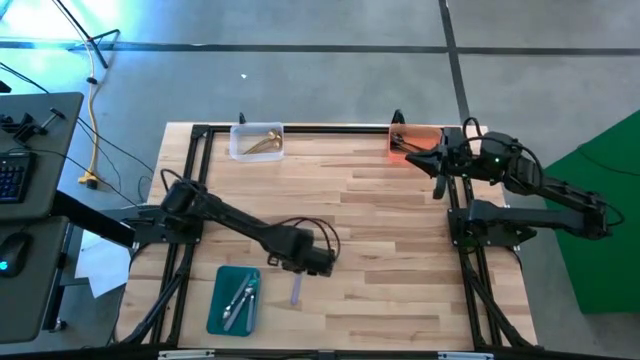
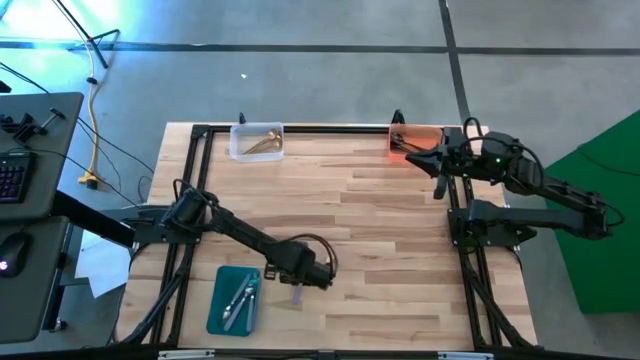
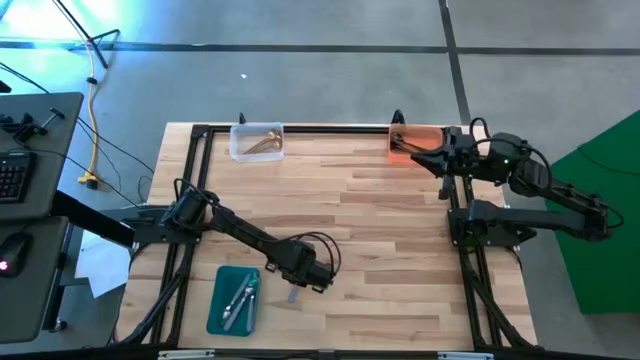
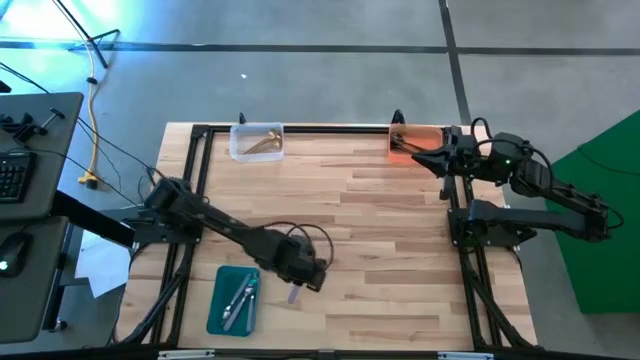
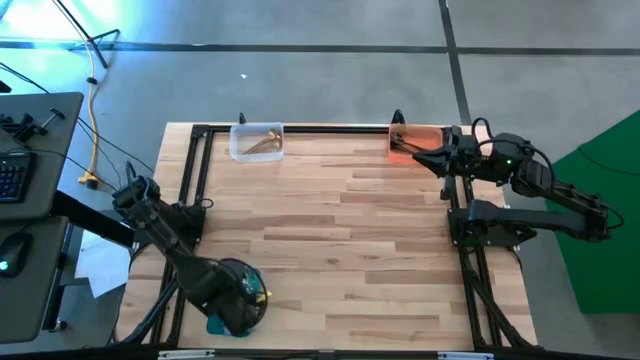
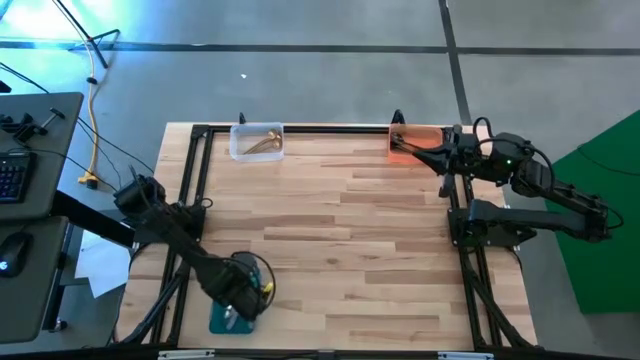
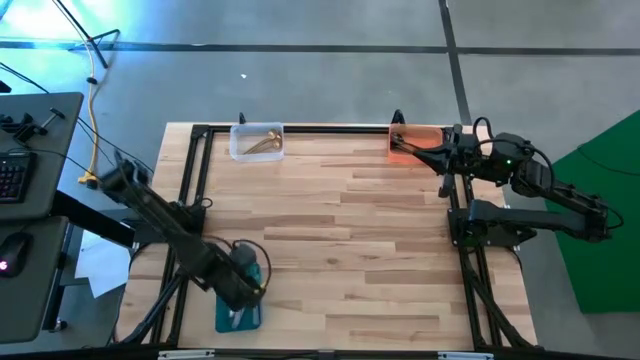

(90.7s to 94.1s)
Task: Sort silverware by color (type)
Put the purple spoon into the blue bin

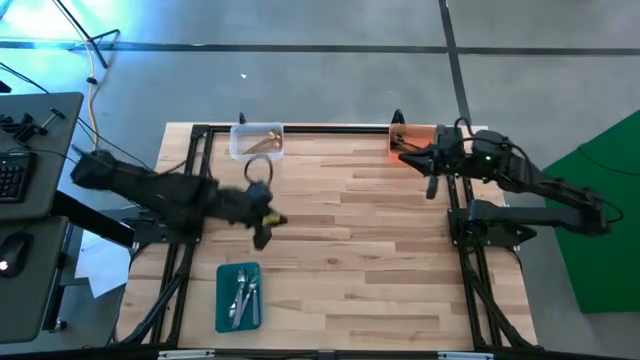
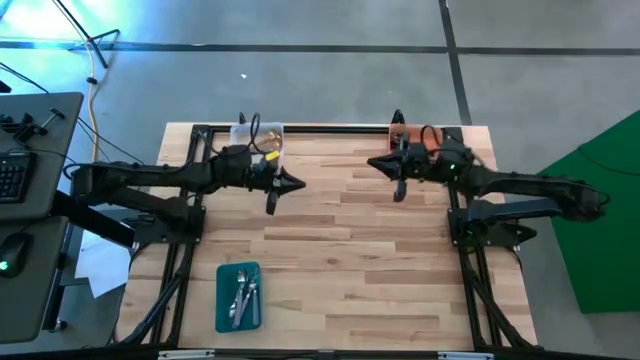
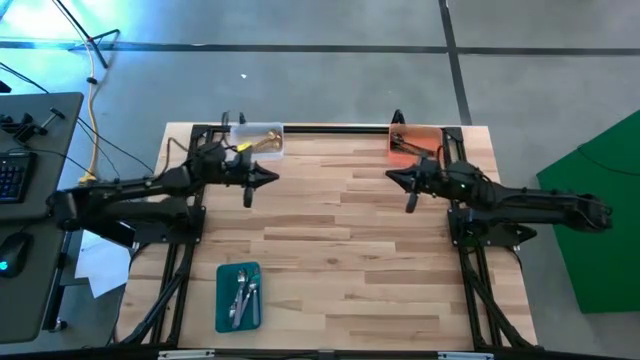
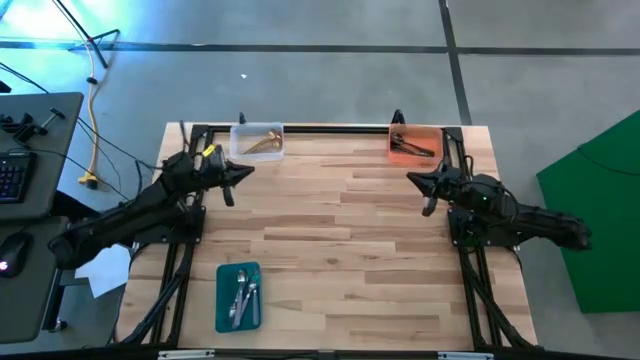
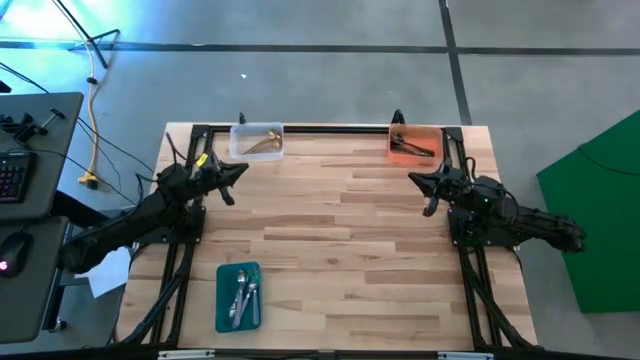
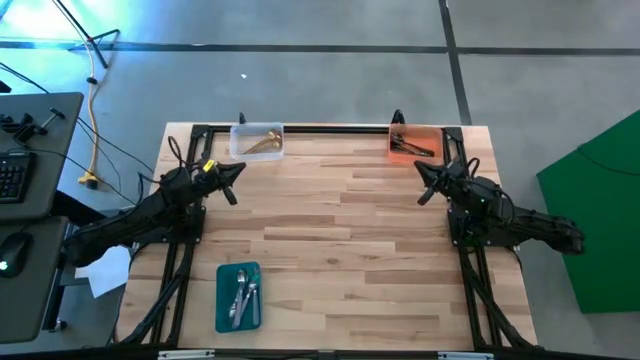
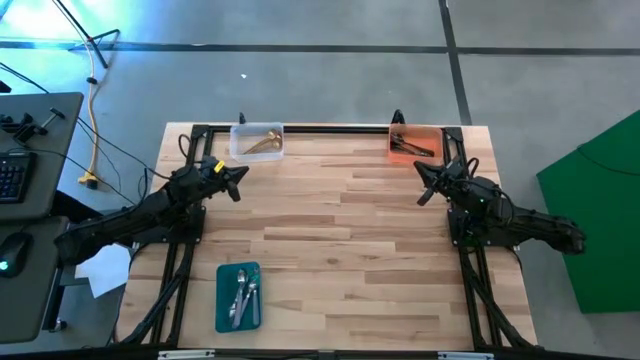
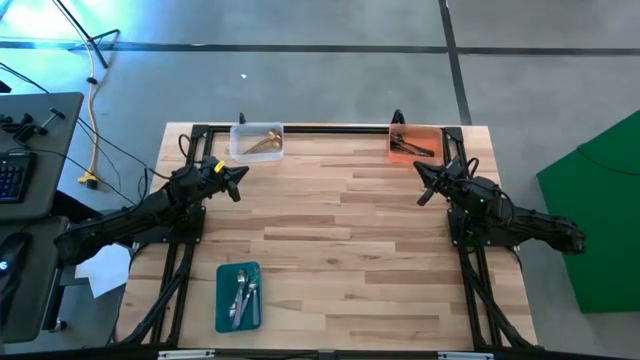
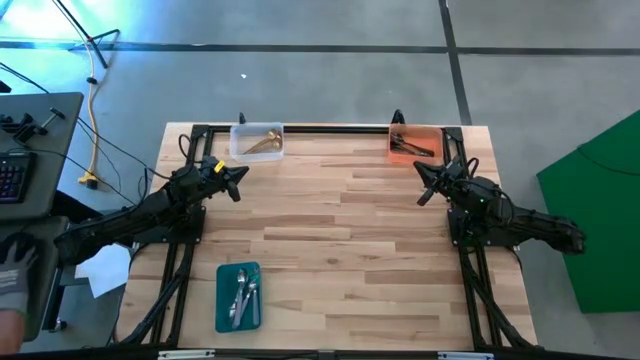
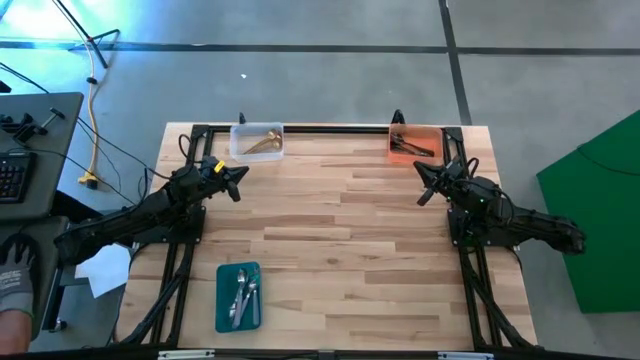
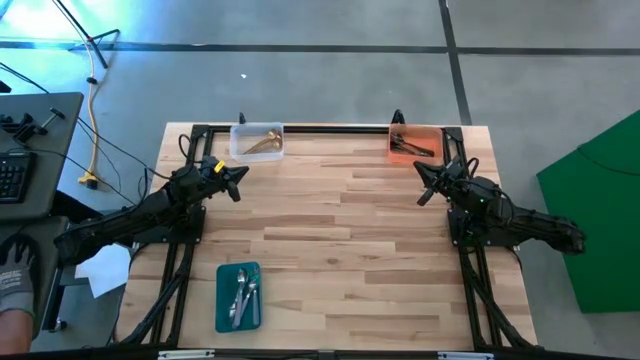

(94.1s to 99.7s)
Return to Home Position

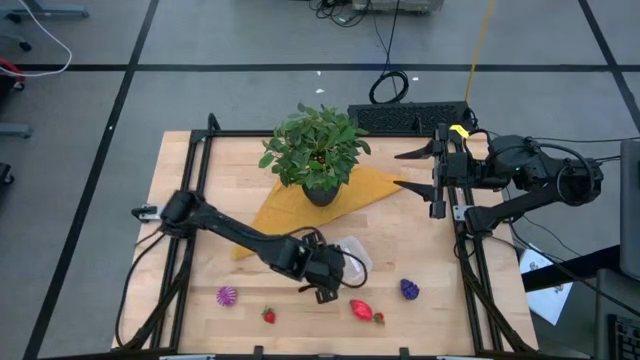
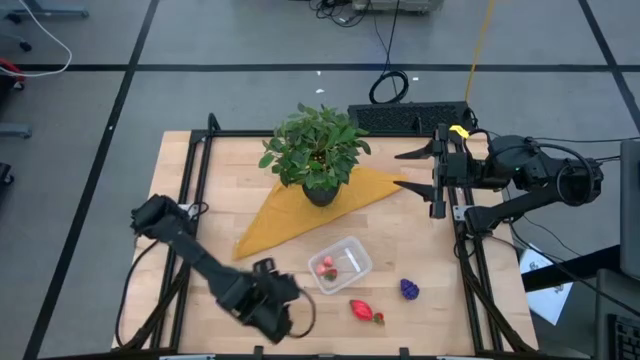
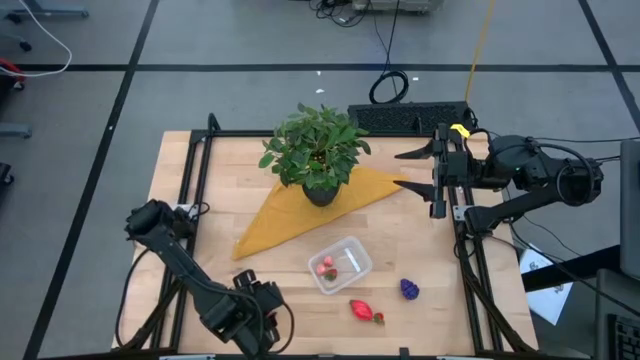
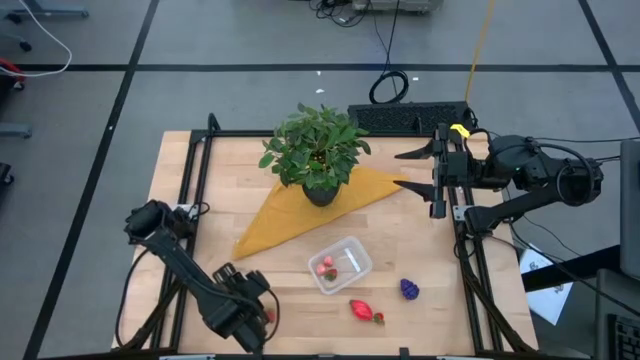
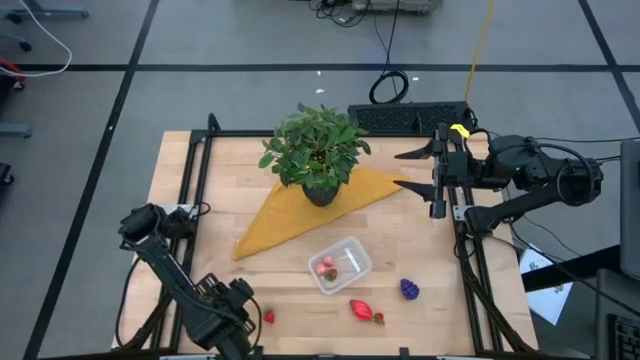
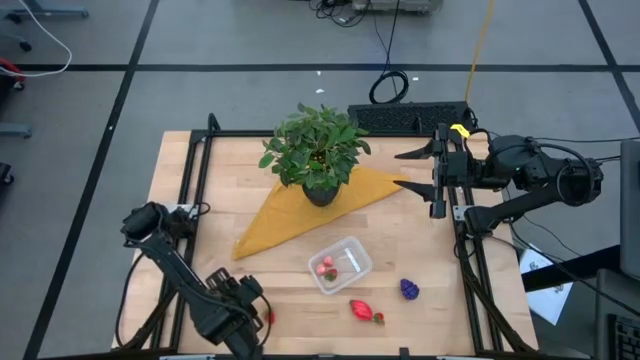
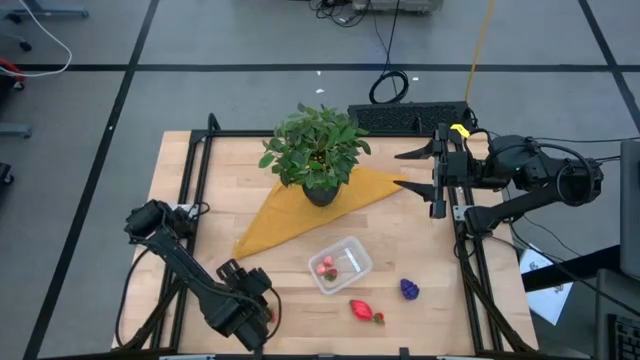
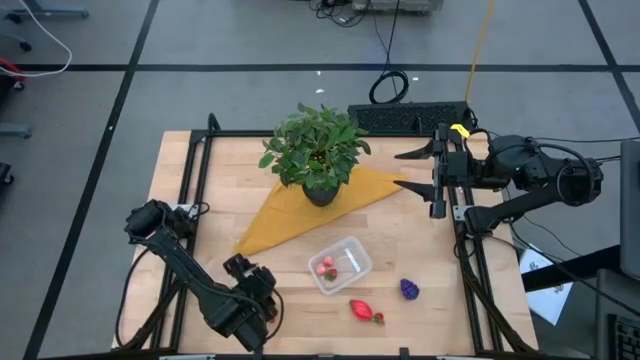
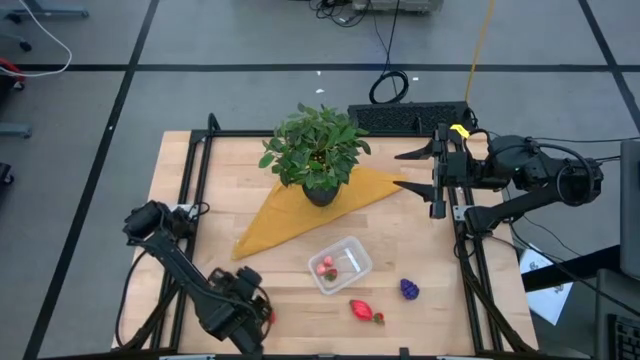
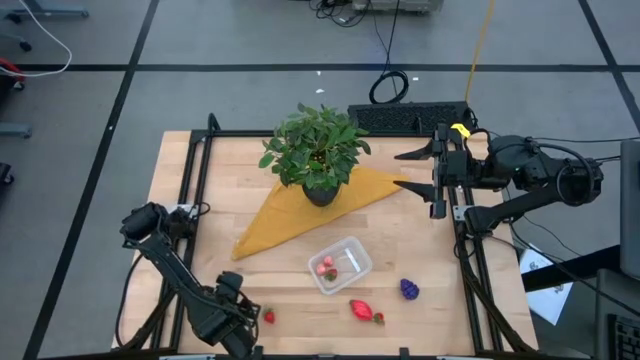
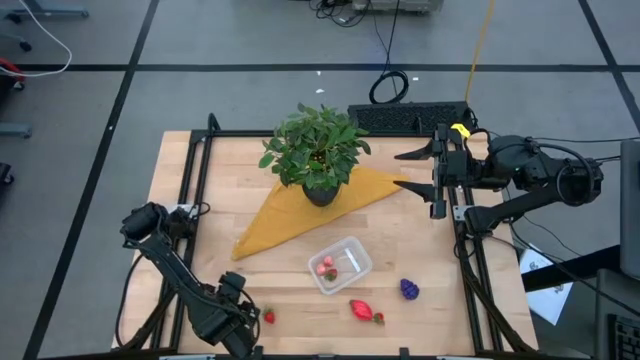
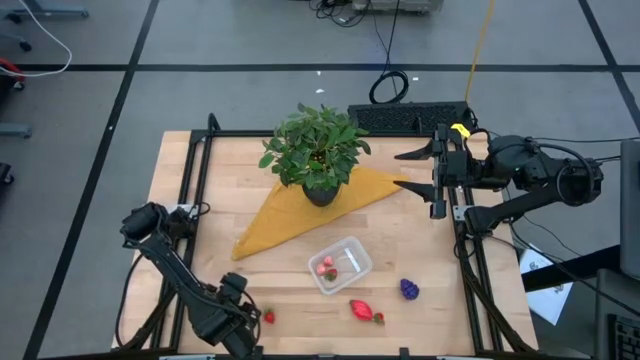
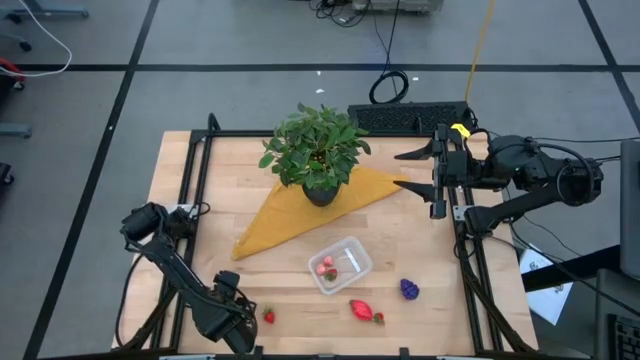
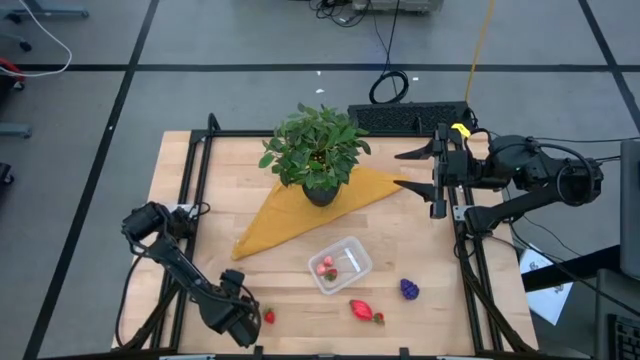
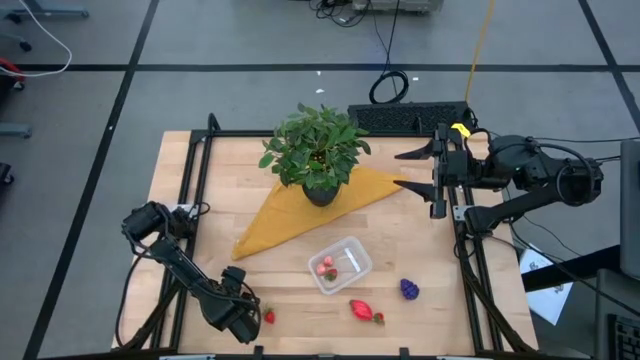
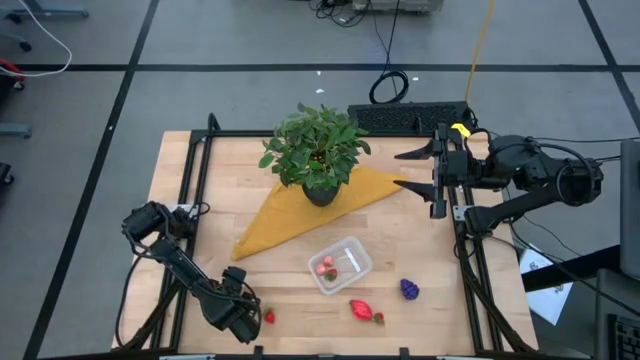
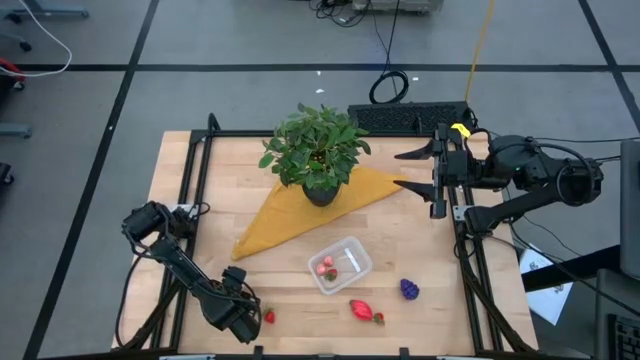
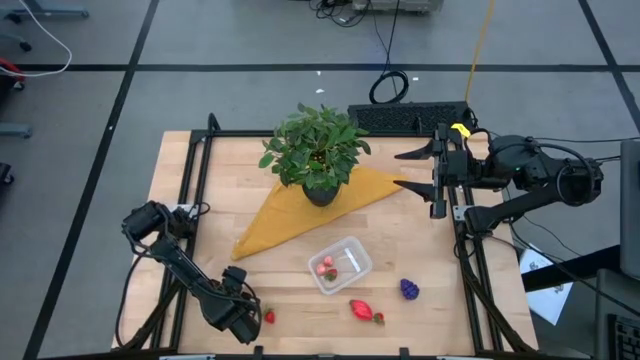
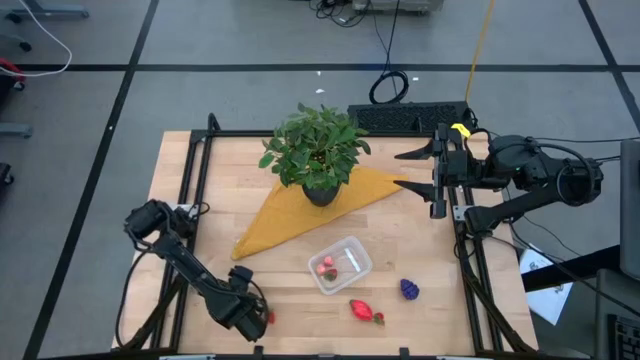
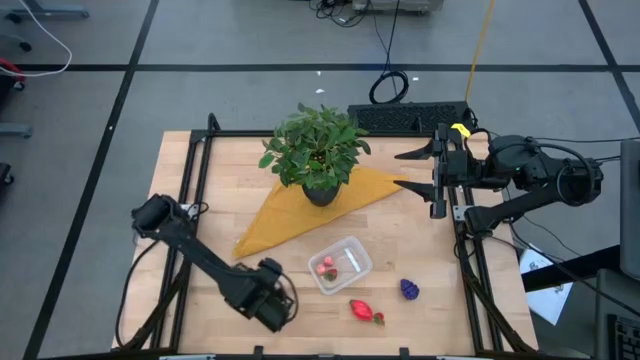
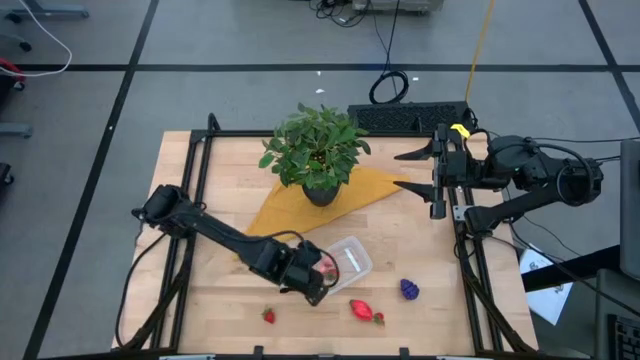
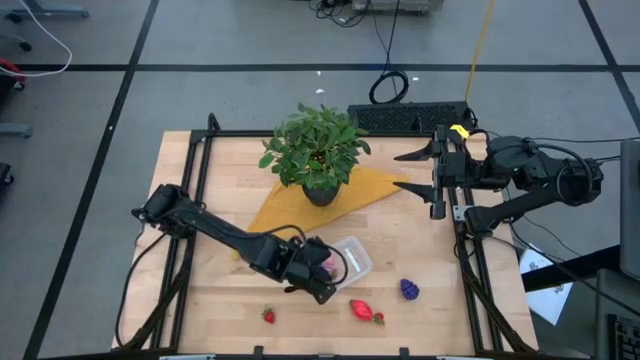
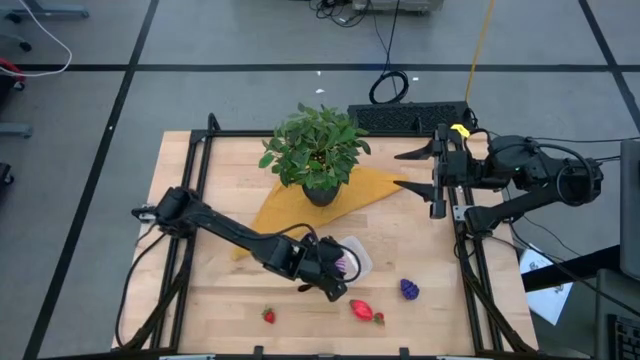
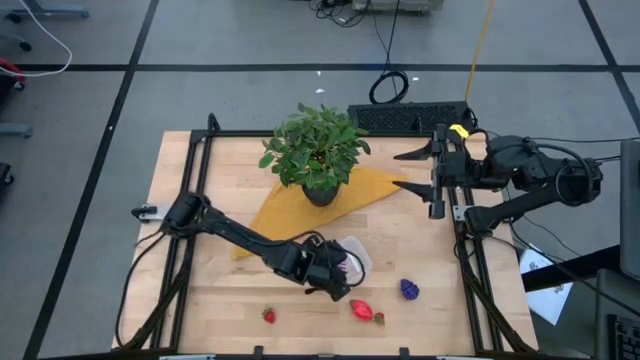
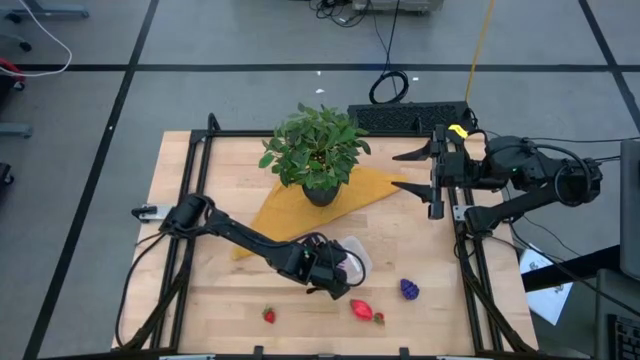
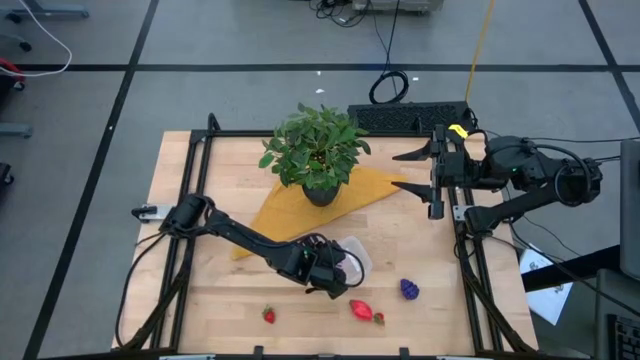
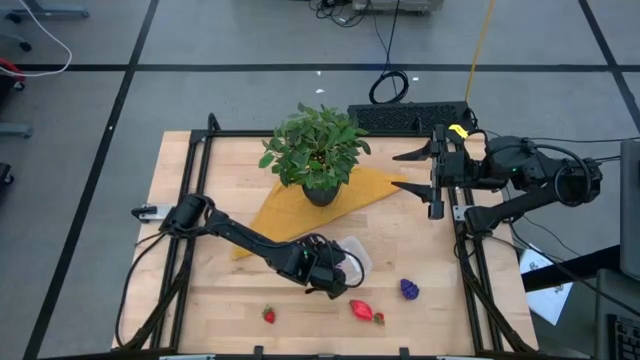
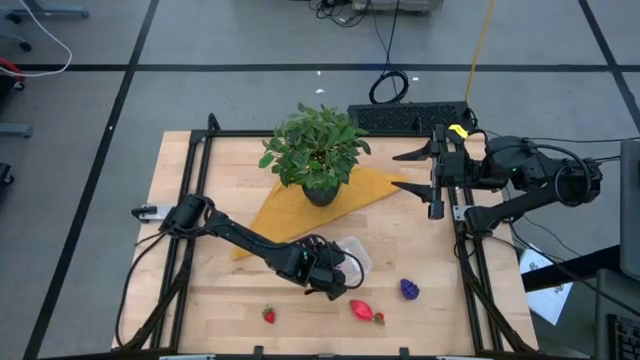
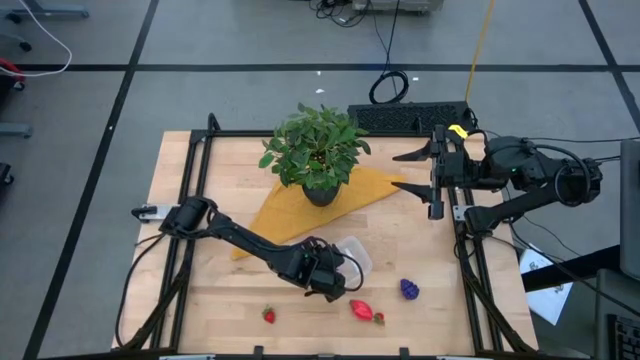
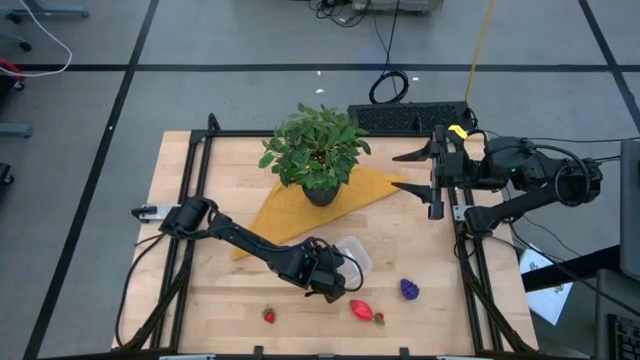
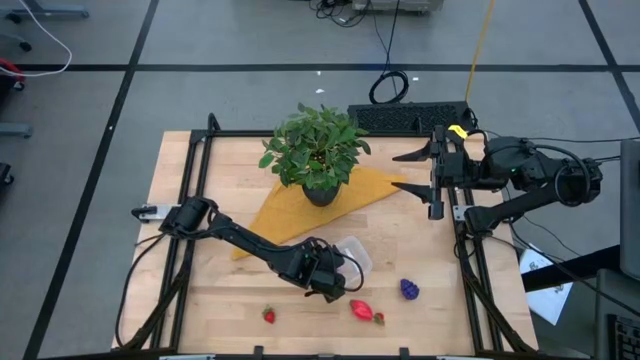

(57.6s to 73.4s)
Task: Pick and placing Produce into tupperware
Put the onion into the transparent bin
